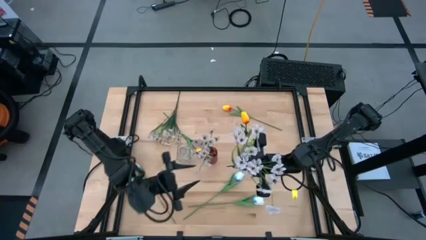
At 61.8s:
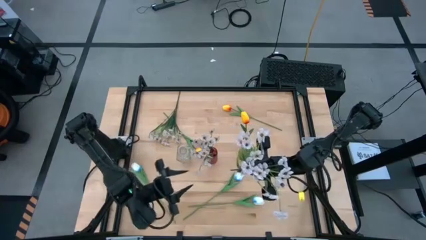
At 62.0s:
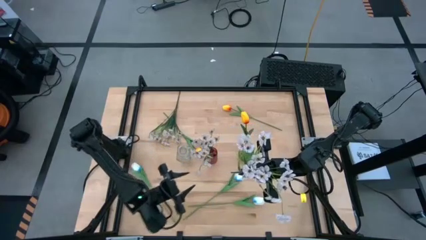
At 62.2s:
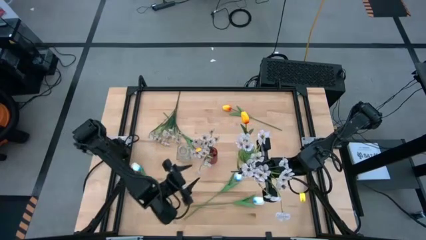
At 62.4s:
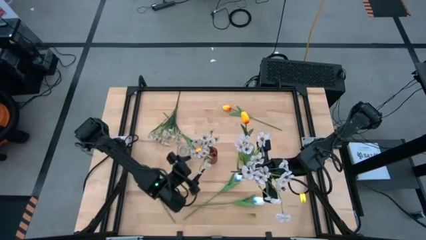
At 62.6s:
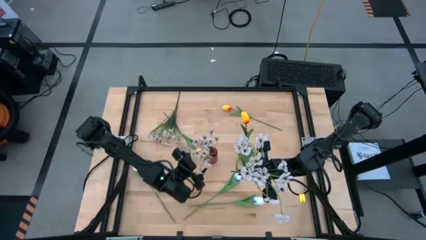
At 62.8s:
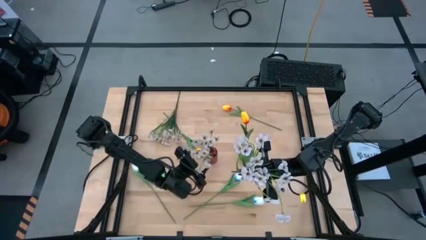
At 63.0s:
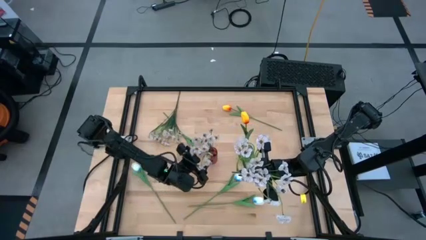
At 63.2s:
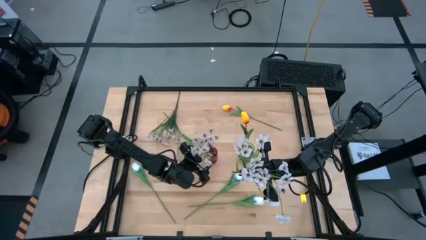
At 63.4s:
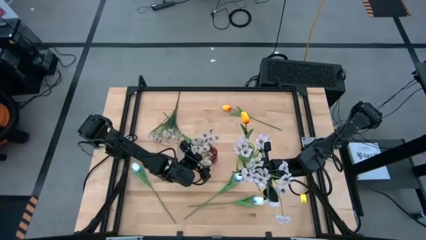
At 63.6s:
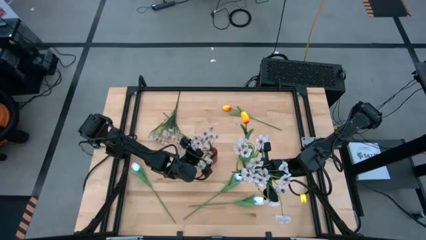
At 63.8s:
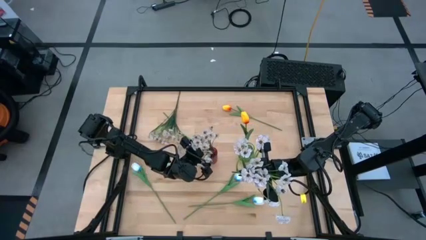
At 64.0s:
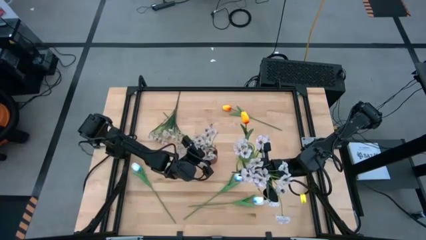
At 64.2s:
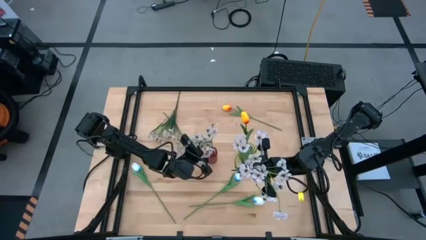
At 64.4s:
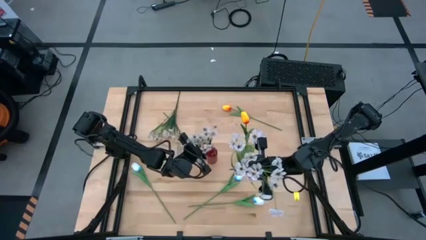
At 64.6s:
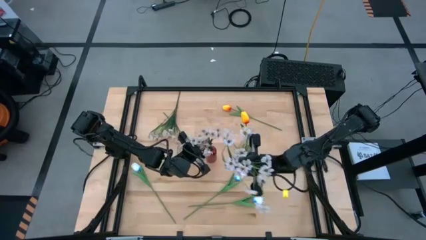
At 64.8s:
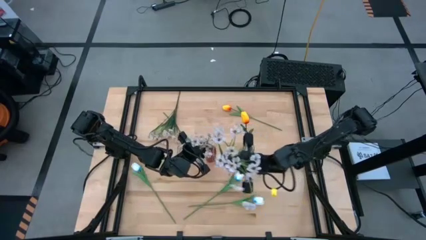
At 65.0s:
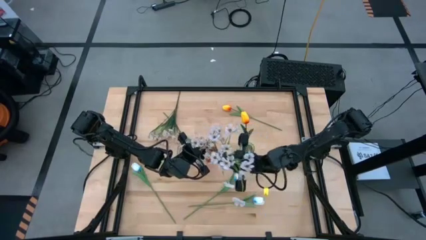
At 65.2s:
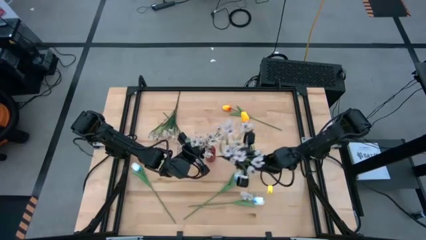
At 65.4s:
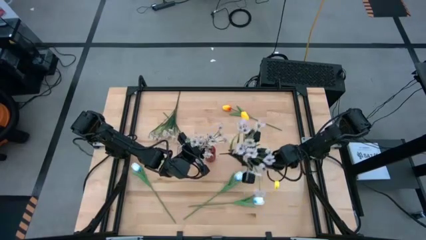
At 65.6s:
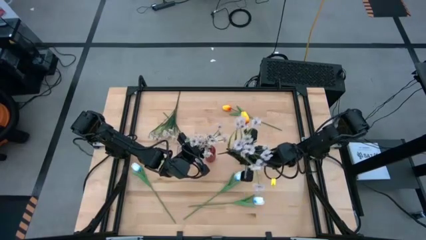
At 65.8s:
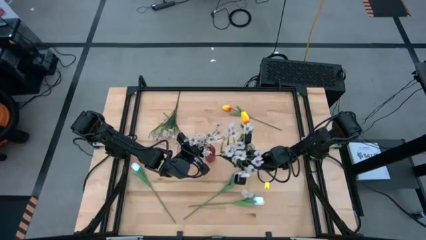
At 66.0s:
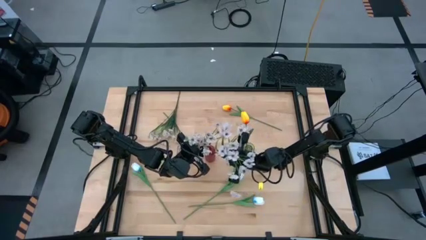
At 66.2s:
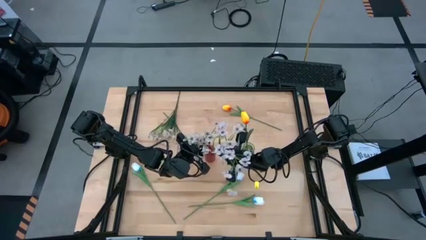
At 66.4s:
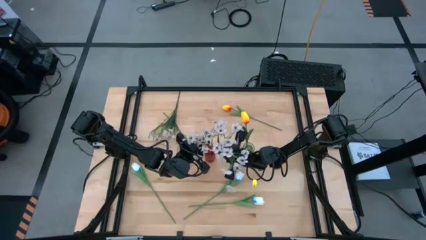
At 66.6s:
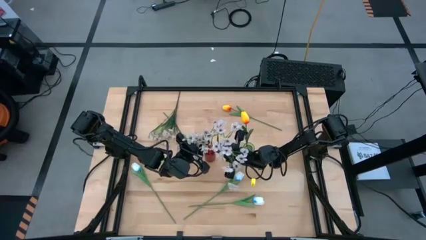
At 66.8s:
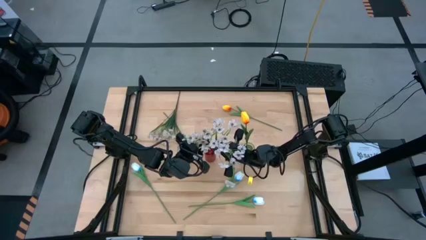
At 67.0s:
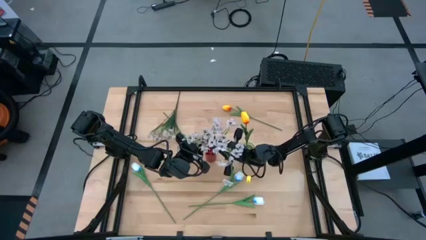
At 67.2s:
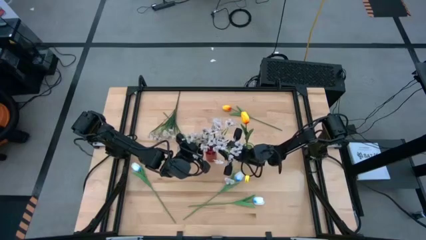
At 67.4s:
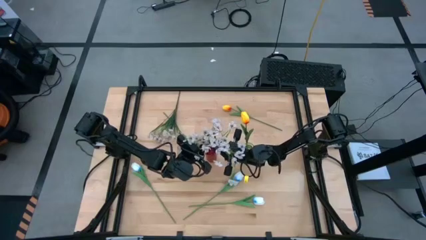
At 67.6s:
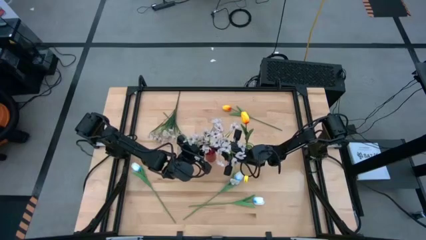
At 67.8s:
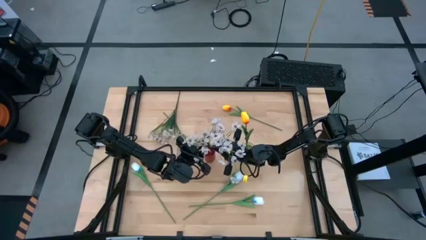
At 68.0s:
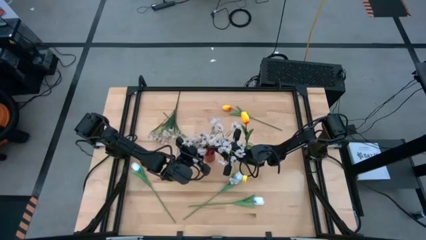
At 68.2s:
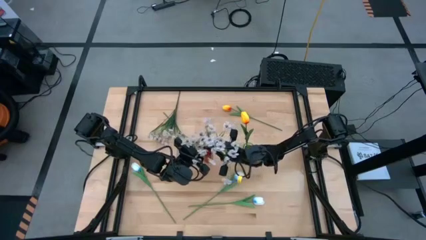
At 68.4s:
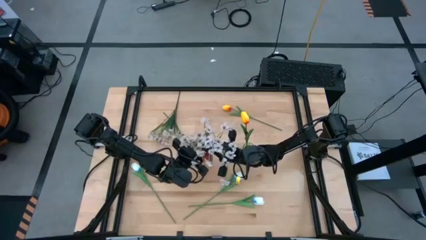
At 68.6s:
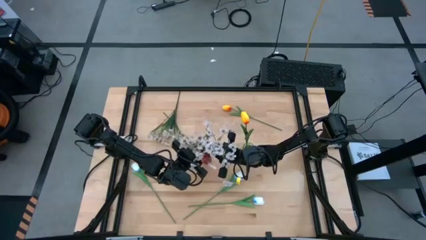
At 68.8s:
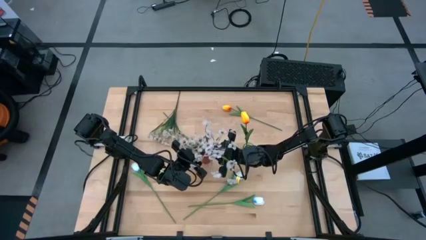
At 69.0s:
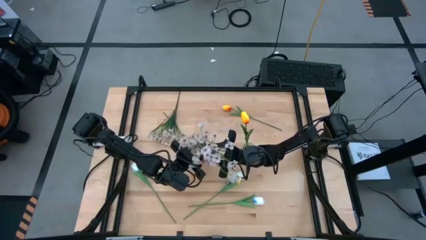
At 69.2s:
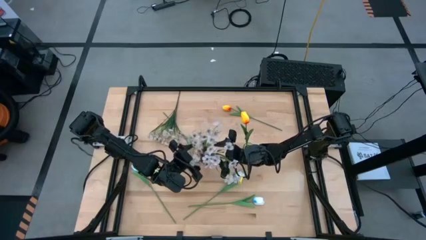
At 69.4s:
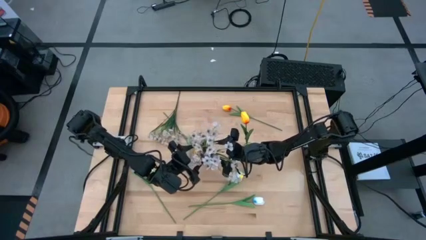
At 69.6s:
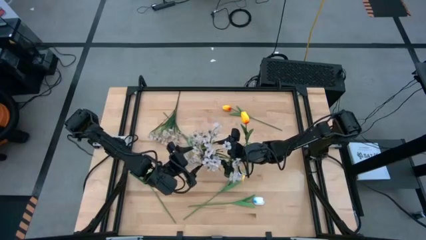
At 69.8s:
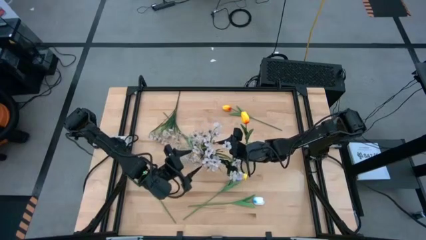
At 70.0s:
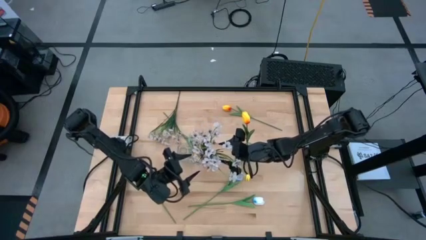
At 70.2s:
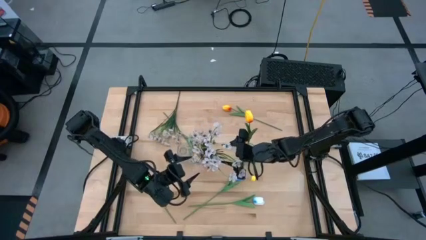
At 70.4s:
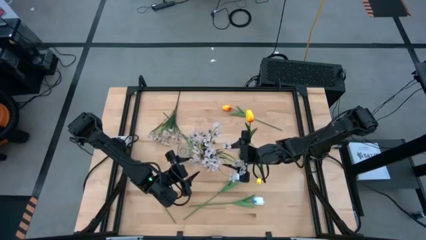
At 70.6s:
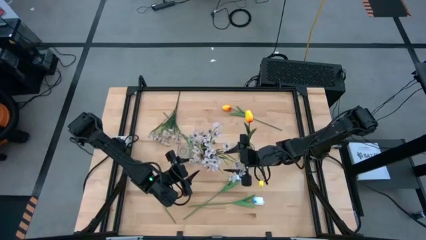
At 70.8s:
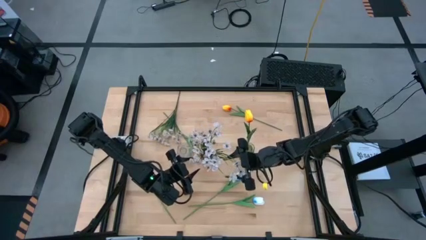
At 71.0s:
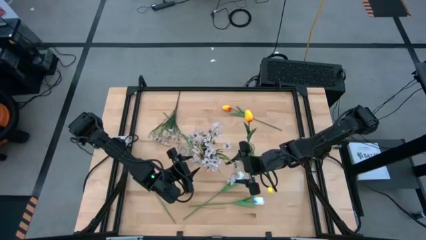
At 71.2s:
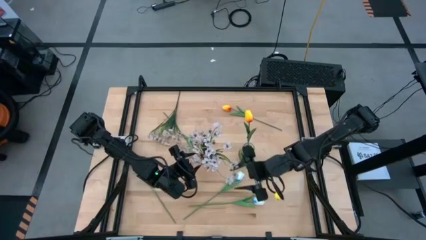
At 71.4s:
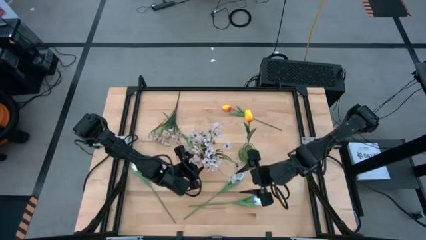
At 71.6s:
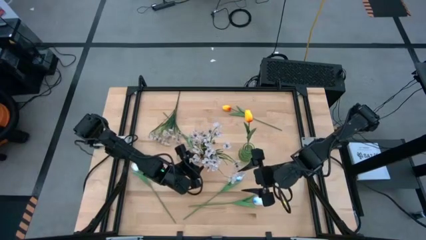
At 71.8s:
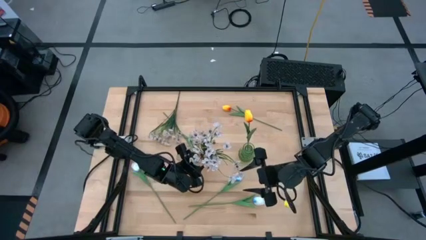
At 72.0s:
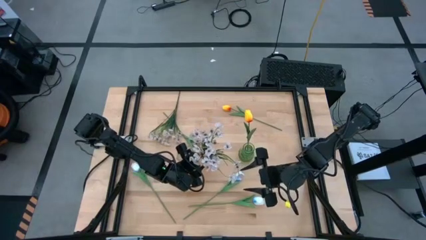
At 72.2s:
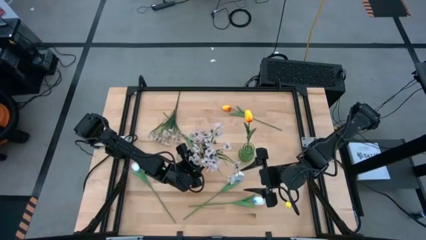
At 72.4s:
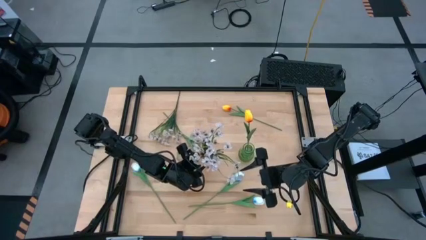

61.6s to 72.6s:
Task: Sort flowers into vase by color
Put the bottom white flowers into the red vase

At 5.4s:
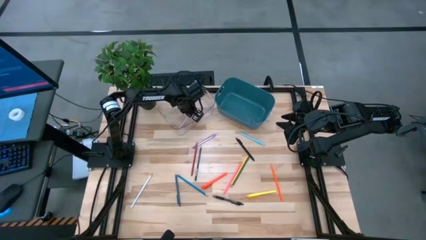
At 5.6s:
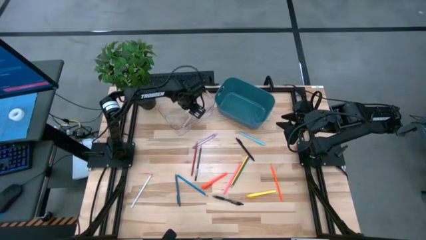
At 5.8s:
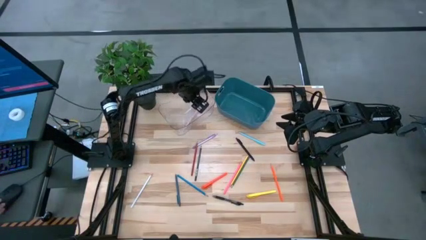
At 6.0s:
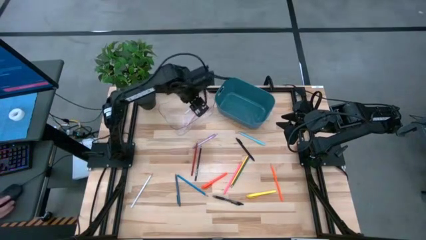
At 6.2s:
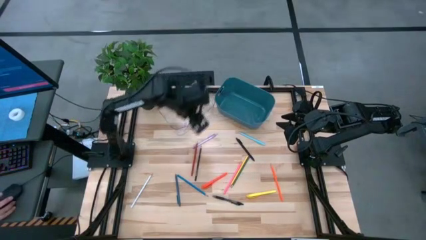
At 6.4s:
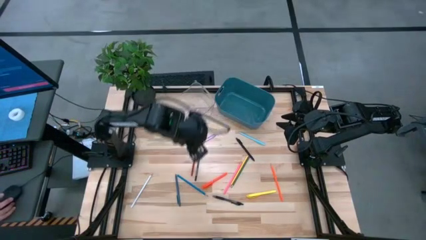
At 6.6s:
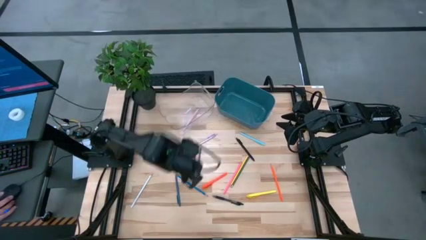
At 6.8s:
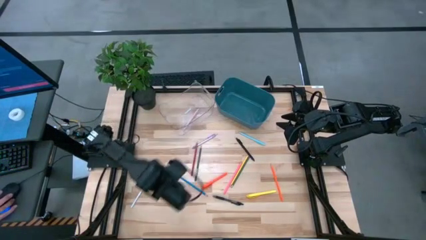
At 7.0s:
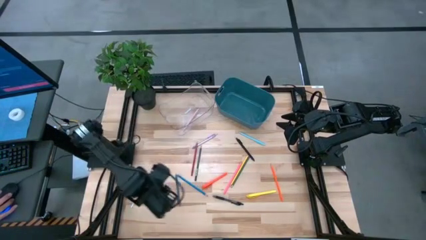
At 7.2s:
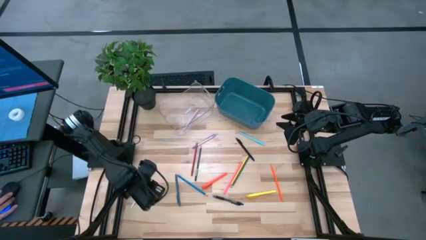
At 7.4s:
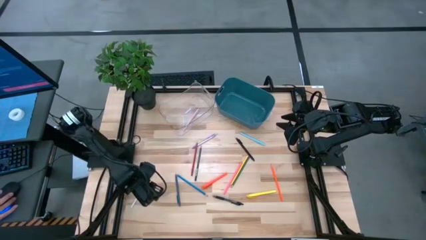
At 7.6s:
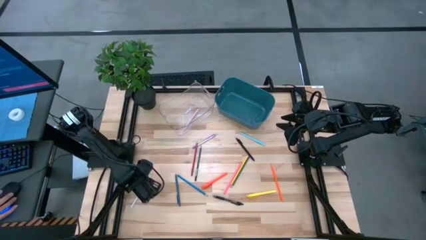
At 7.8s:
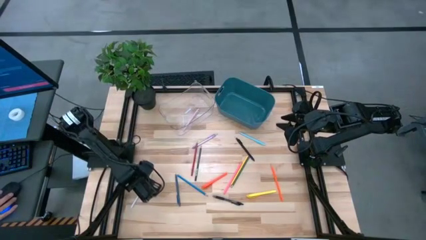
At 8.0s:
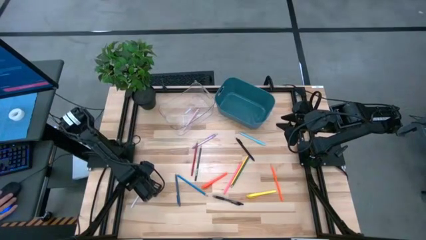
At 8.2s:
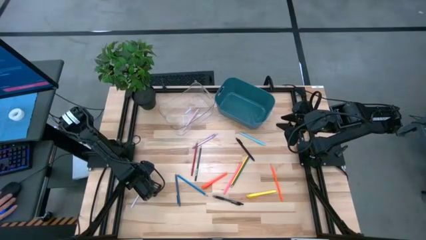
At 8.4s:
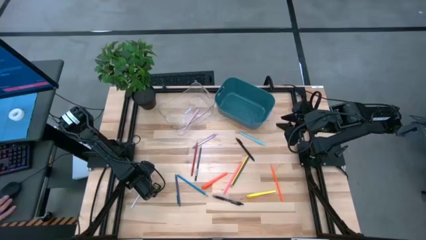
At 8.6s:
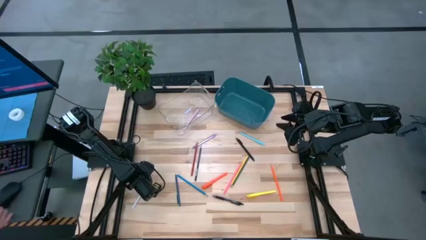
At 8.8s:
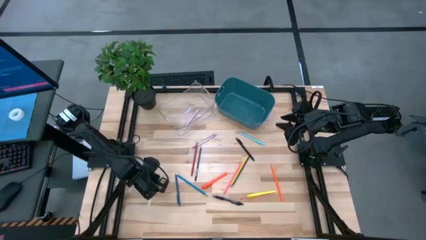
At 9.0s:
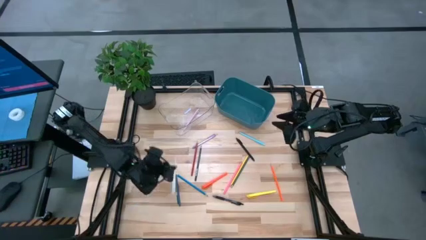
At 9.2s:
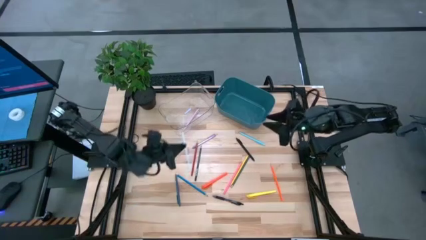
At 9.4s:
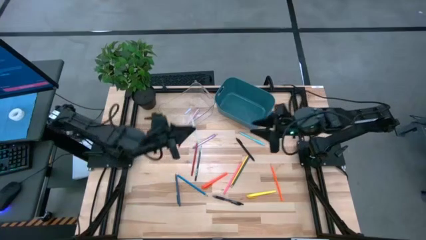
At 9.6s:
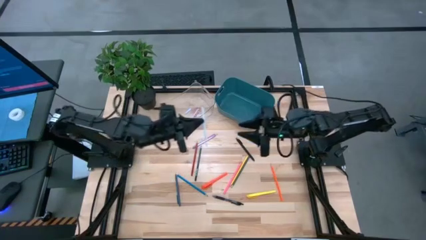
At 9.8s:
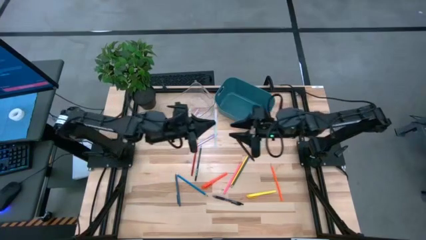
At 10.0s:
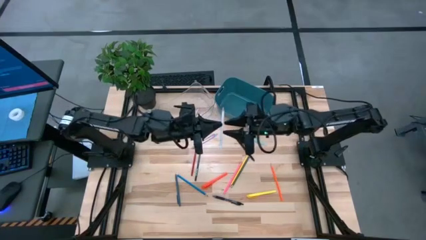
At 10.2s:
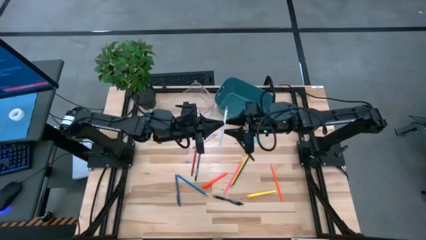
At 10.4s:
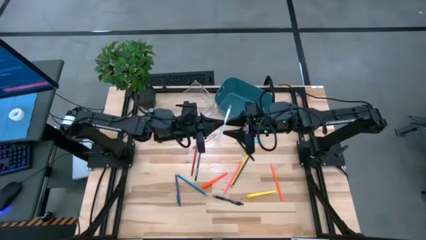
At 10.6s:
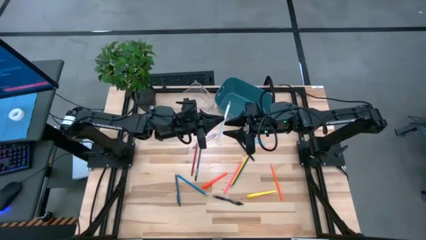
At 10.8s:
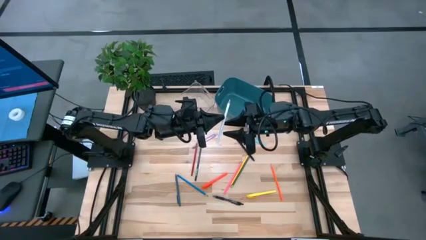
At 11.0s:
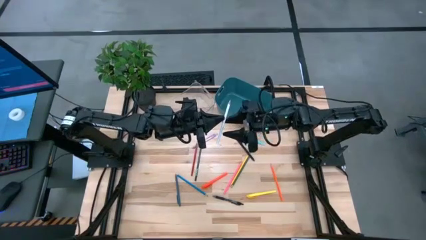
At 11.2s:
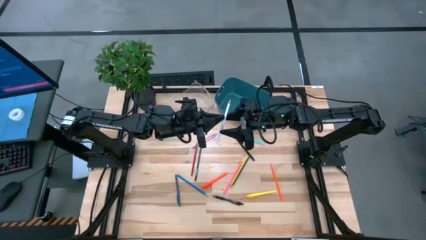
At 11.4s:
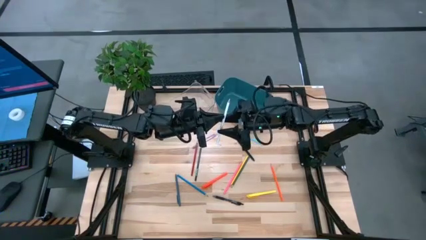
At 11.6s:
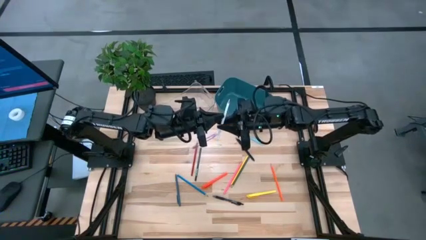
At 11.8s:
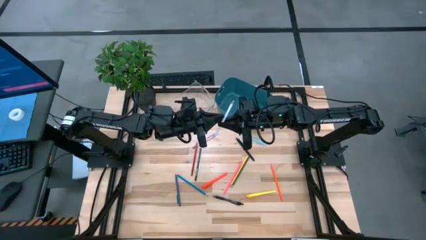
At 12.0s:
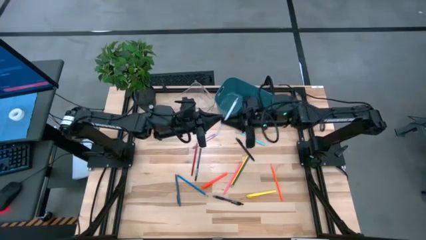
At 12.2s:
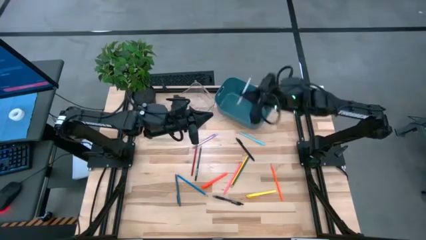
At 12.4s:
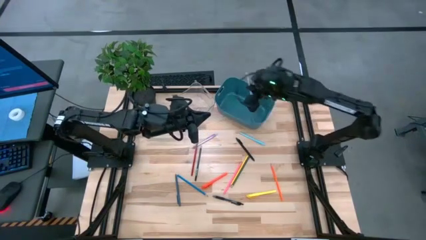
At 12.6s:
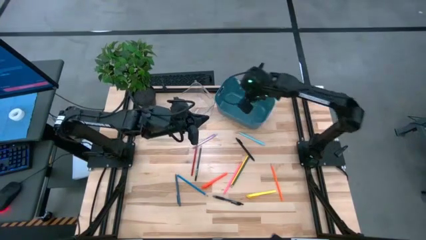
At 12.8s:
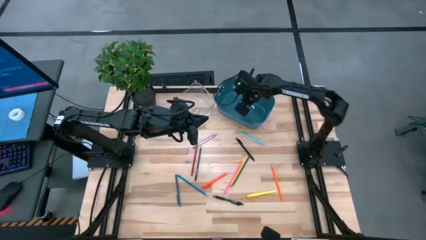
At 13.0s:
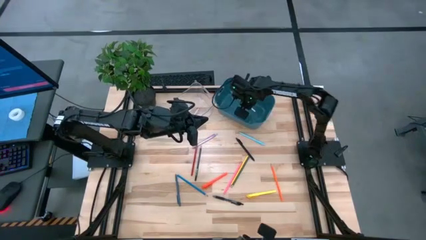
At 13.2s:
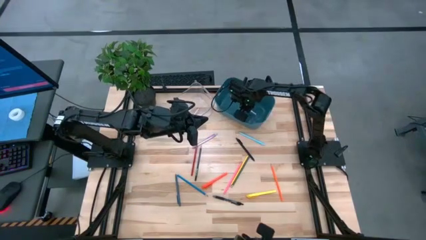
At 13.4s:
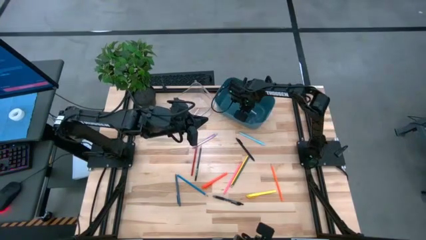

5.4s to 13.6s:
Task: Sort pens & pencils
Put the white colored pencil into the blue bin
